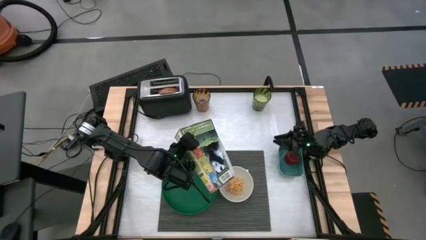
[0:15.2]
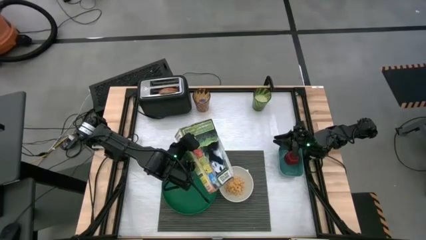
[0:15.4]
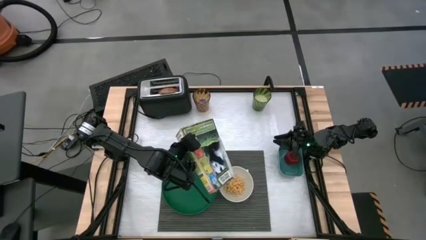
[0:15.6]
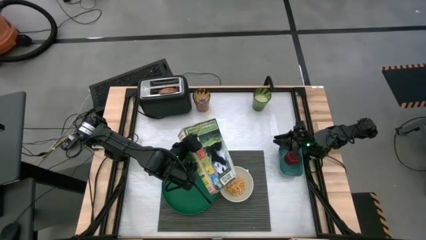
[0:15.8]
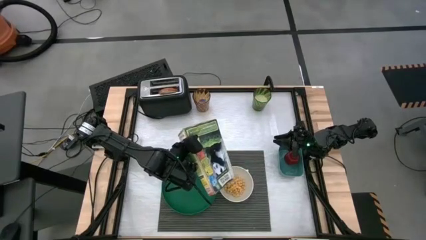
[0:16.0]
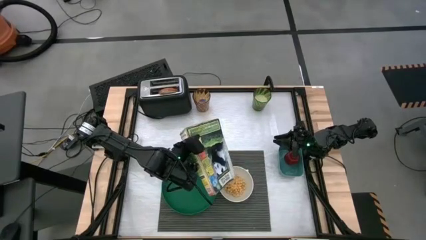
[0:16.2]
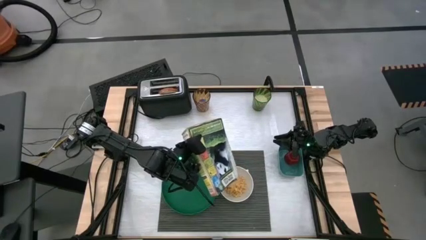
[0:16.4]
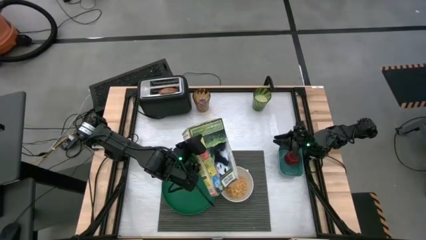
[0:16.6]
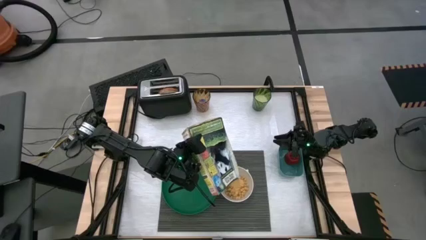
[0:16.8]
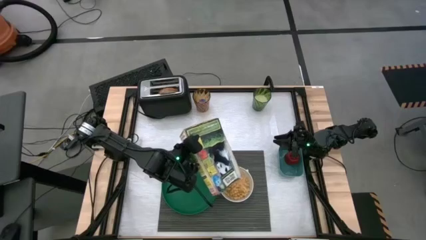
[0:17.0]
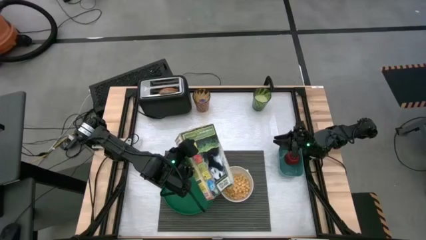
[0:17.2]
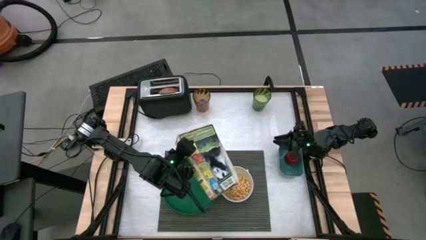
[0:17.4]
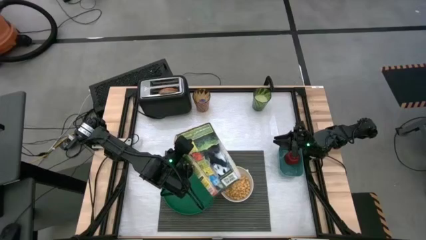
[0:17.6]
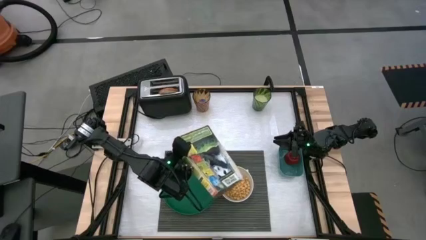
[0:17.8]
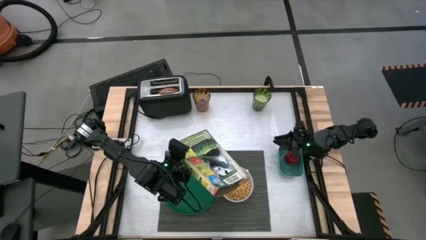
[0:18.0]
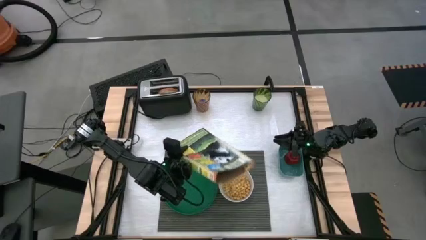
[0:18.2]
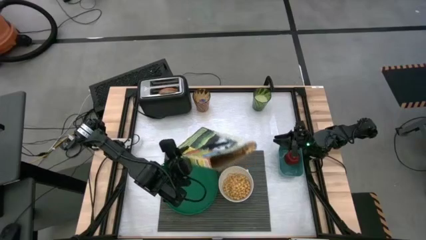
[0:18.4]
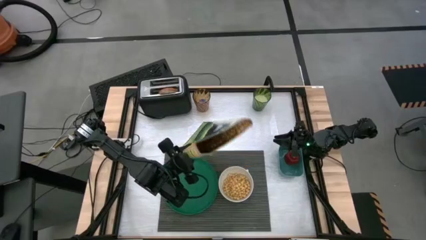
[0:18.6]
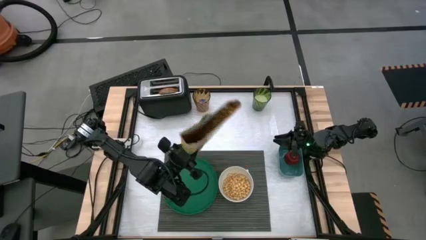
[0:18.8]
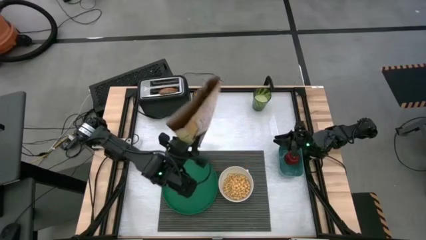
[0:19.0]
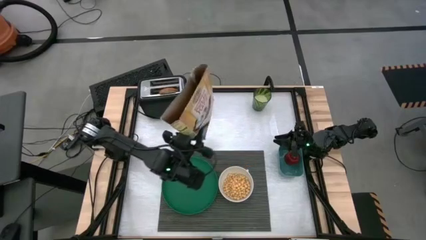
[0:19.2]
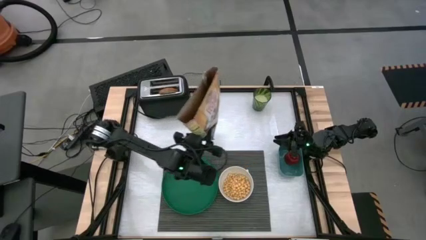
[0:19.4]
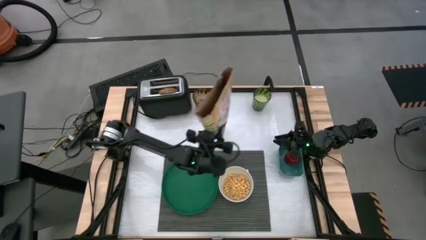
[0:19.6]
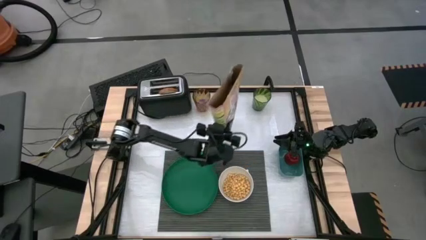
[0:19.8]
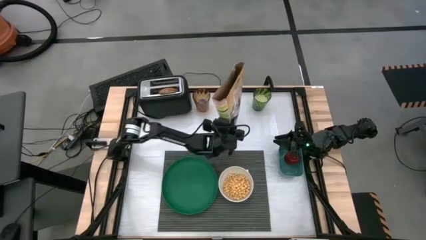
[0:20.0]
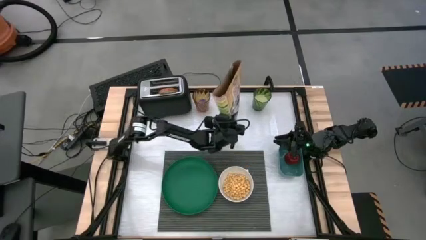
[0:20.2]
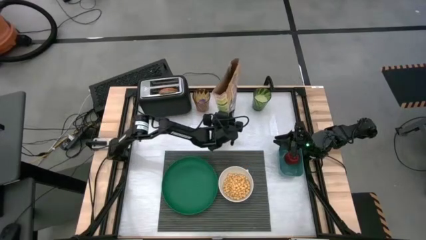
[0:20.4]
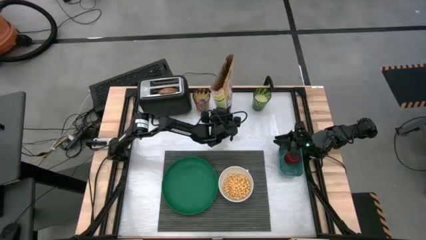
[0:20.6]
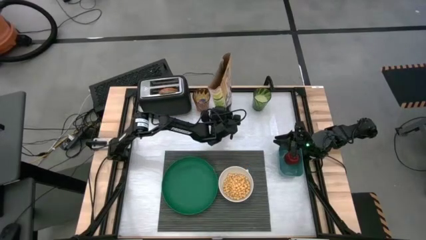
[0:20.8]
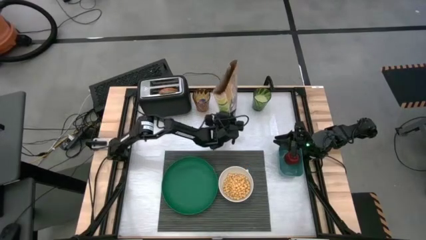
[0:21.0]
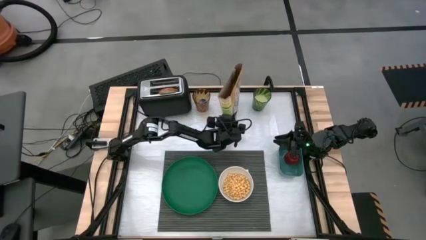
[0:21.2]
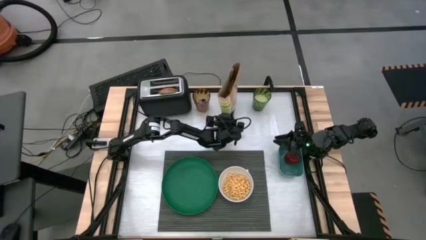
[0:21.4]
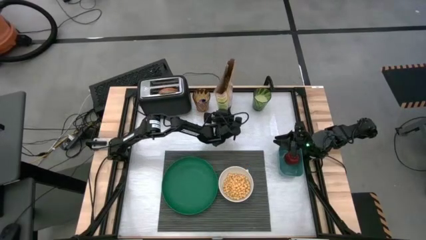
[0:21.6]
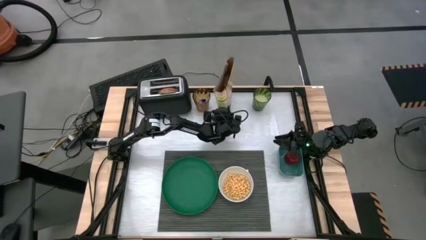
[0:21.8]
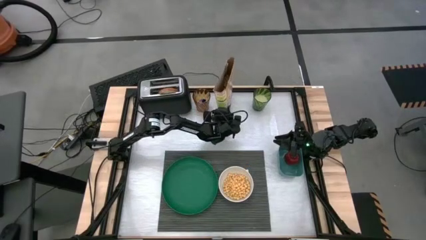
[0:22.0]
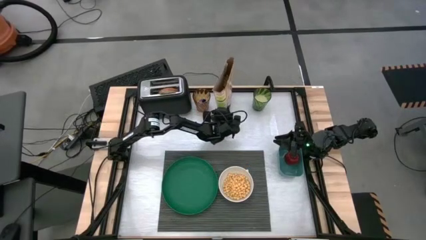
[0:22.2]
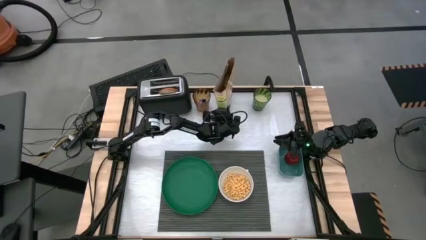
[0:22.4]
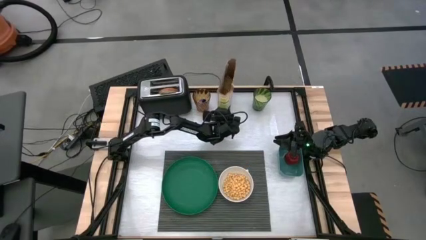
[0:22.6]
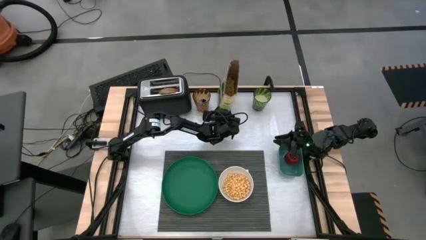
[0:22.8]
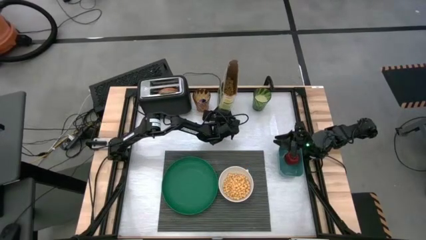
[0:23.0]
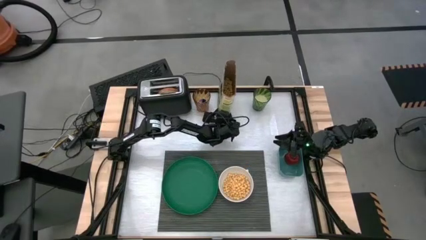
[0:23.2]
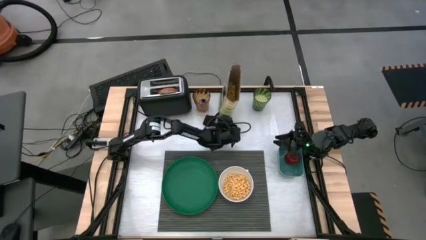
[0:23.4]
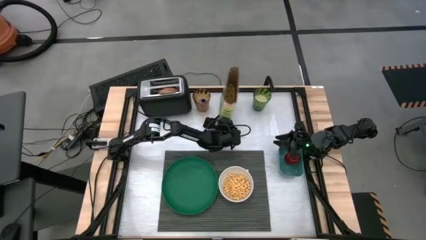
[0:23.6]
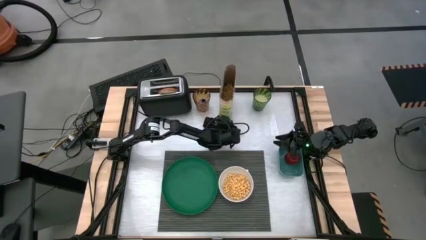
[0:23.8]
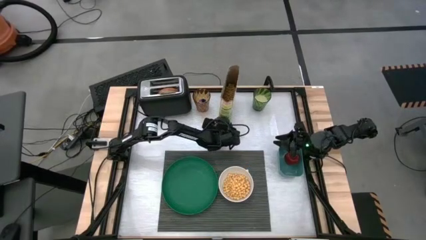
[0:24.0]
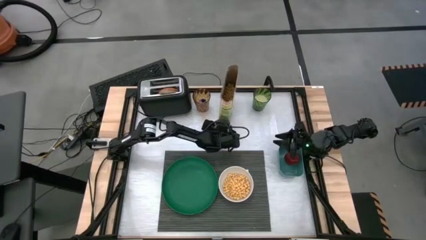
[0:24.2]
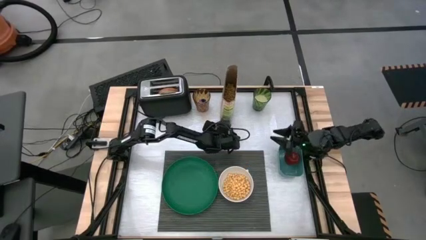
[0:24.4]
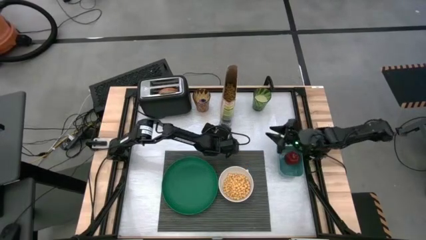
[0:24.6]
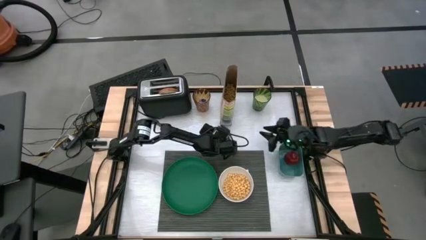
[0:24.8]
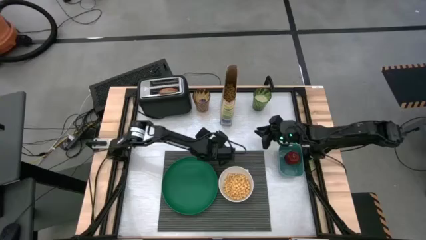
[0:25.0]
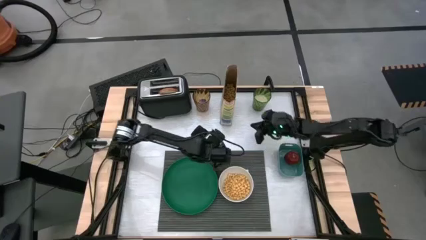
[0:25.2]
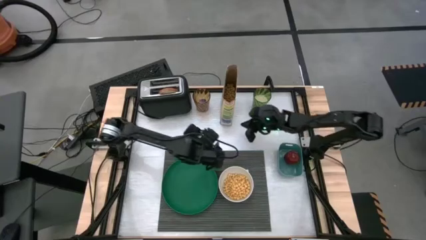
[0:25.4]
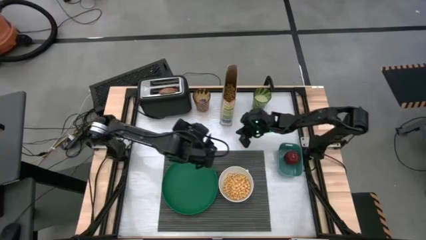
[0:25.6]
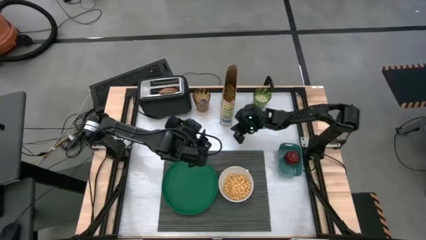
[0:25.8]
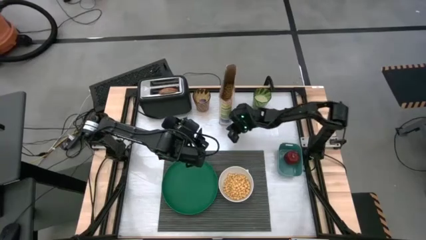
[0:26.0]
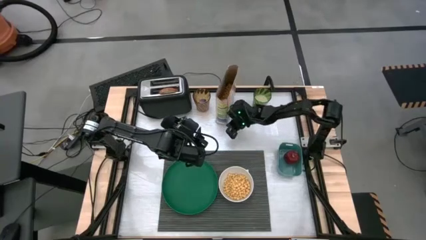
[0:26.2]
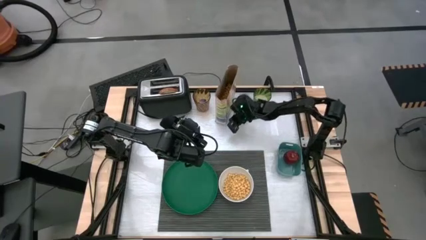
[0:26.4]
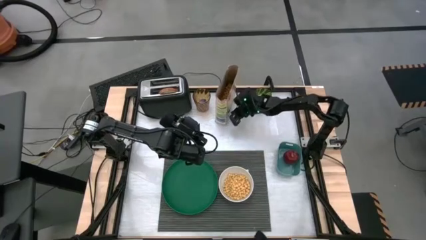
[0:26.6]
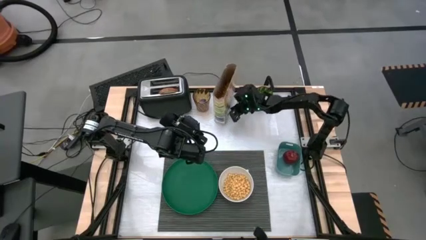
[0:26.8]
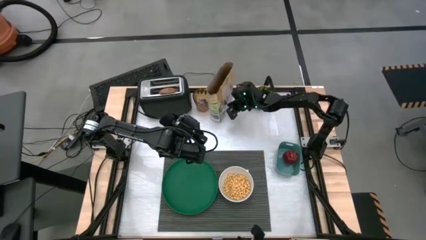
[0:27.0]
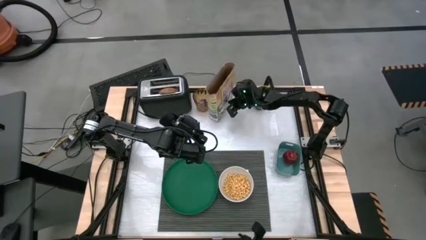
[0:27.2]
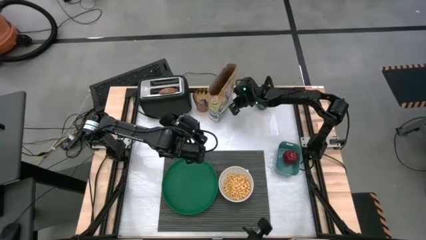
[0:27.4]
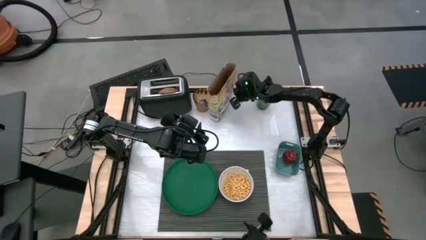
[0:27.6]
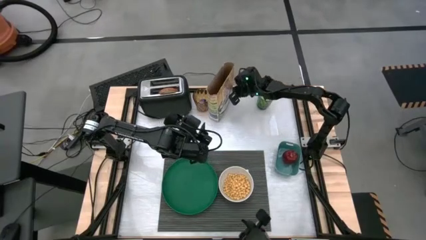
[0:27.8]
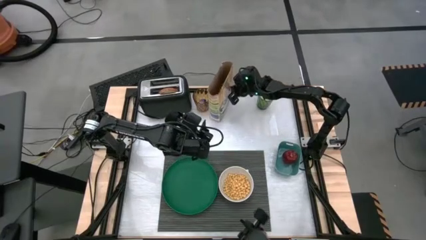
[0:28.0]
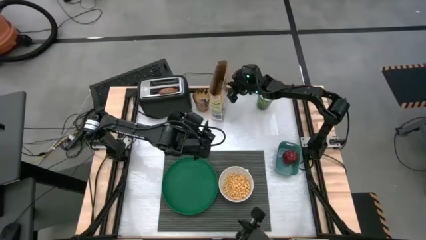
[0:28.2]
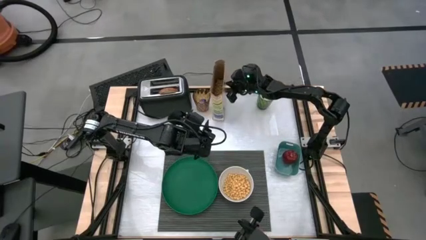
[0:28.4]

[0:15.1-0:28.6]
Task: Arrange a breakfast setting
Pour the cereal into the bowl

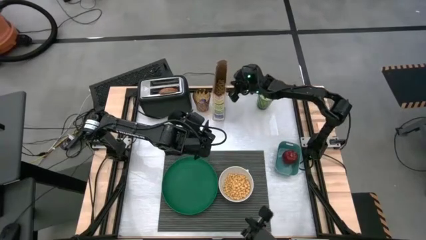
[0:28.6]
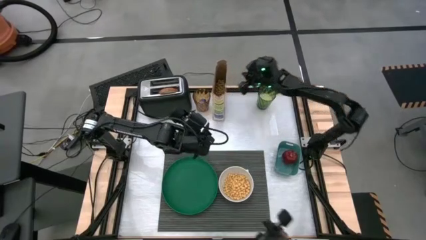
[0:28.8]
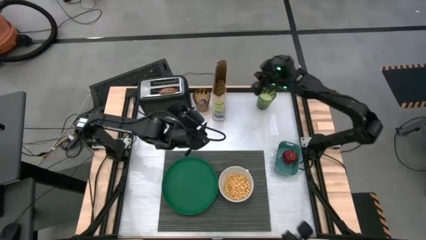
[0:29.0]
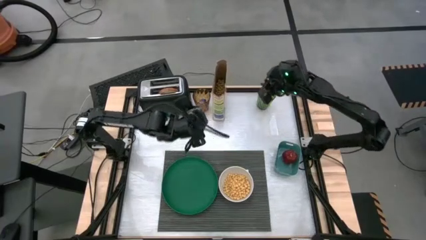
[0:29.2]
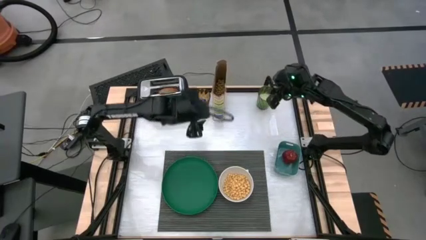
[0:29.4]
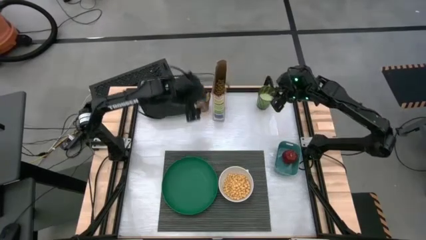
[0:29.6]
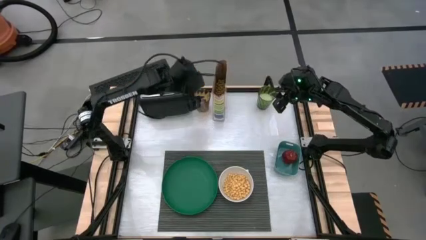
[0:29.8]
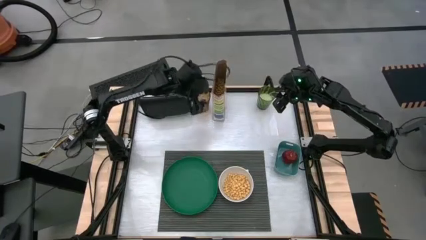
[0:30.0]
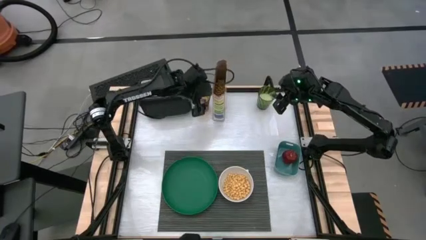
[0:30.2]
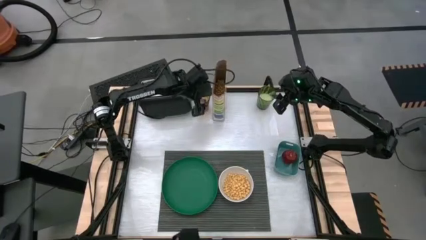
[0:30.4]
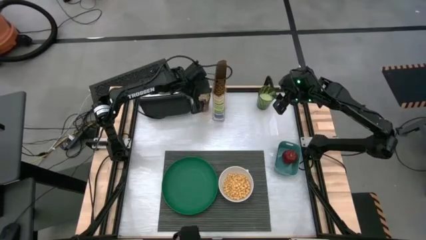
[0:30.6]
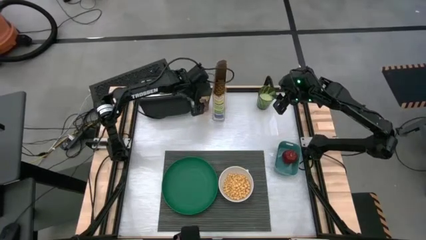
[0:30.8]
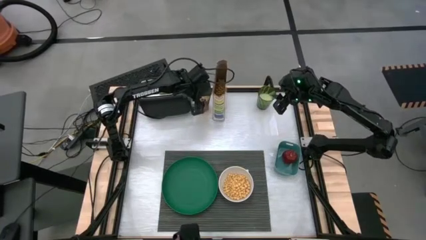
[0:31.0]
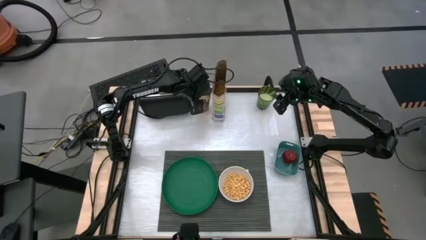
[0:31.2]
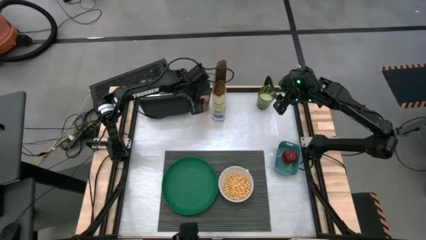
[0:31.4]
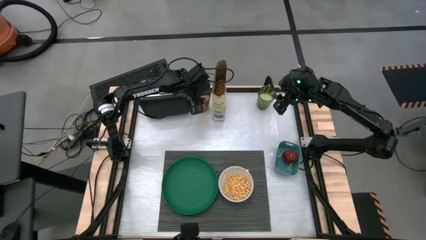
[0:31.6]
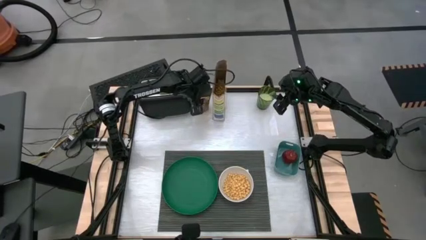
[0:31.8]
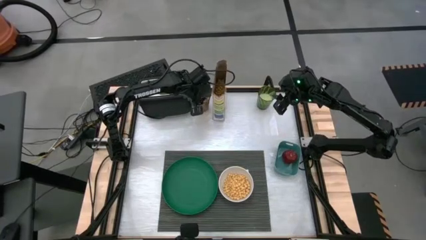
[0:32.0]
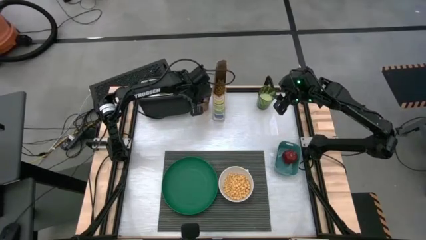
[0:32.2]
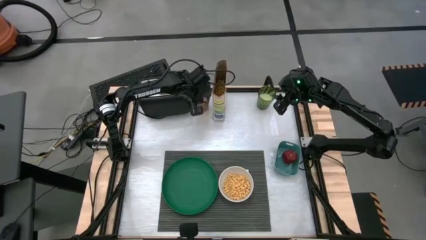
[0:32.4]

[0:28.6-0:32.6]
Put the spoon beside the bowl on the mat
